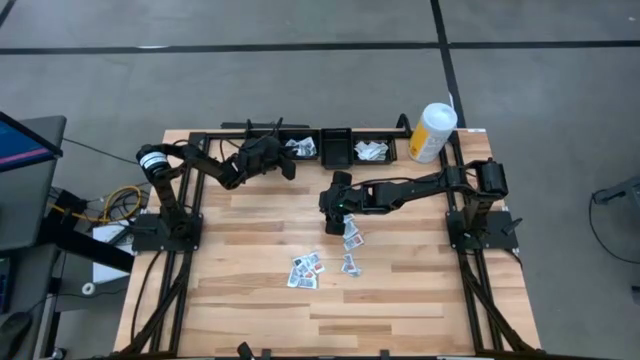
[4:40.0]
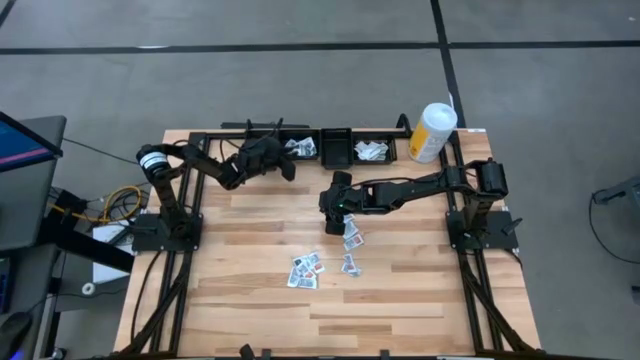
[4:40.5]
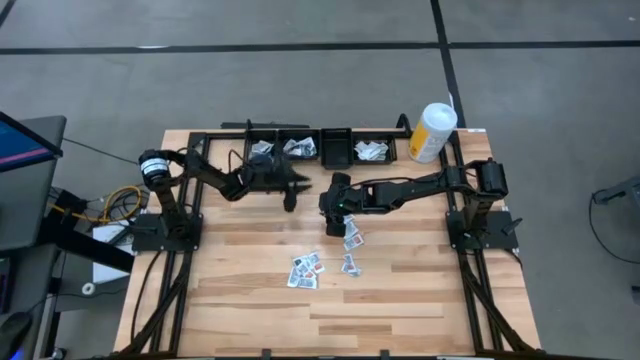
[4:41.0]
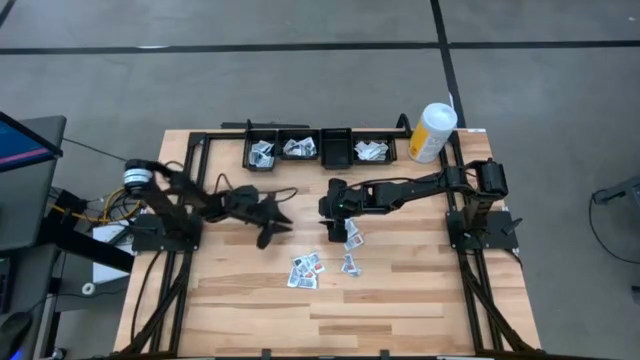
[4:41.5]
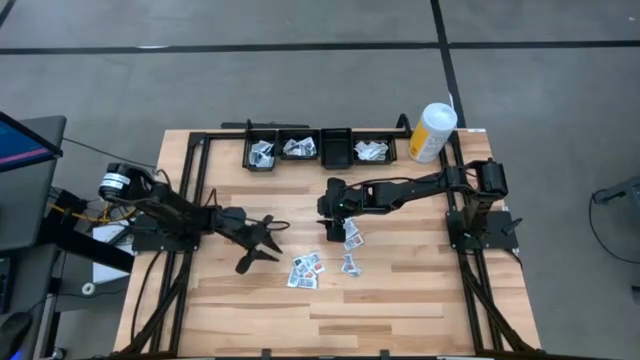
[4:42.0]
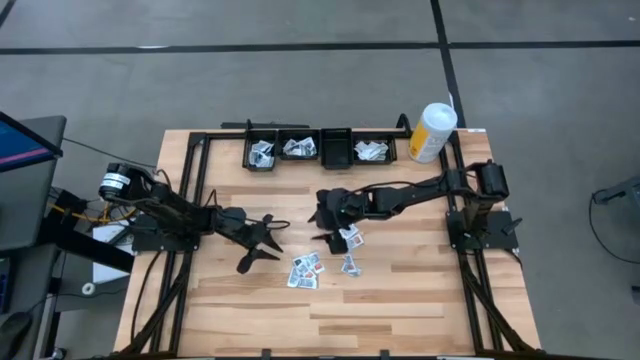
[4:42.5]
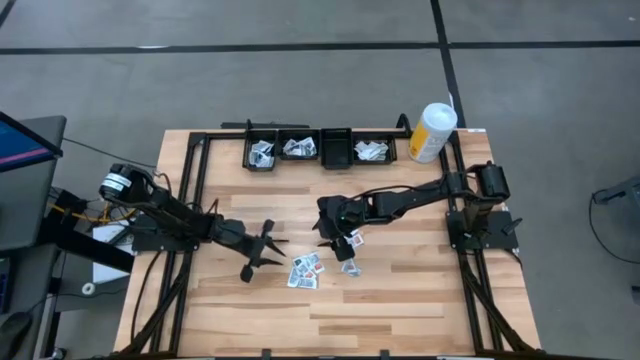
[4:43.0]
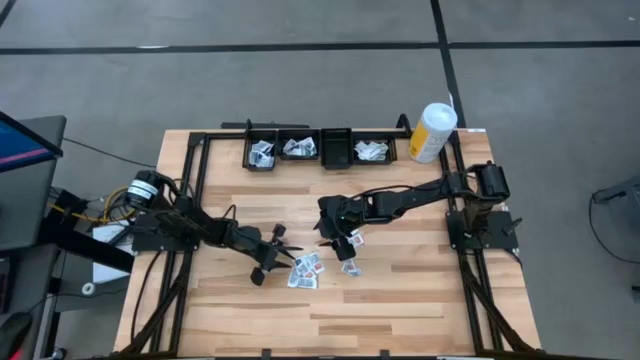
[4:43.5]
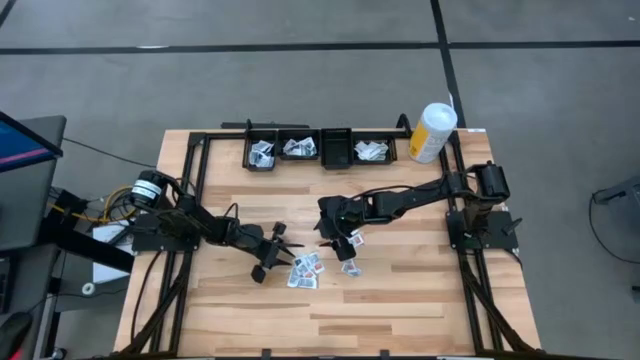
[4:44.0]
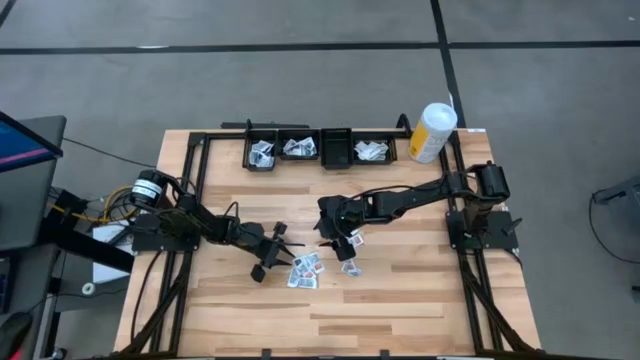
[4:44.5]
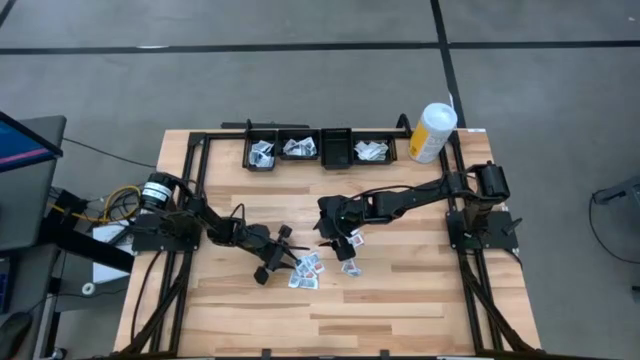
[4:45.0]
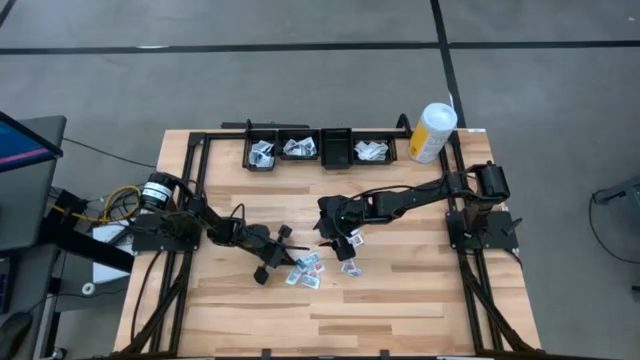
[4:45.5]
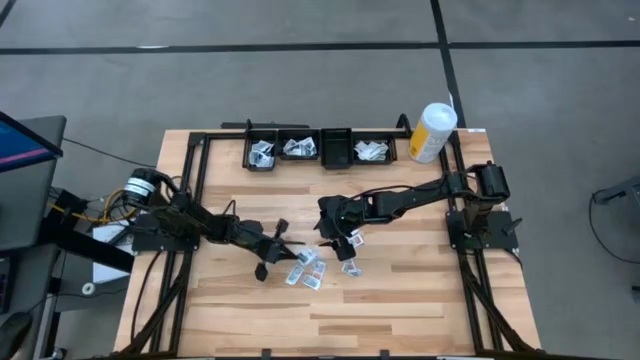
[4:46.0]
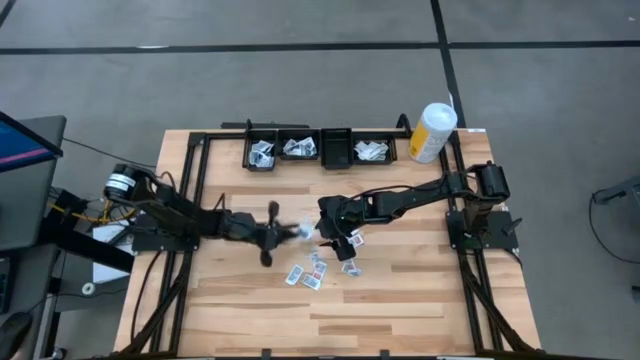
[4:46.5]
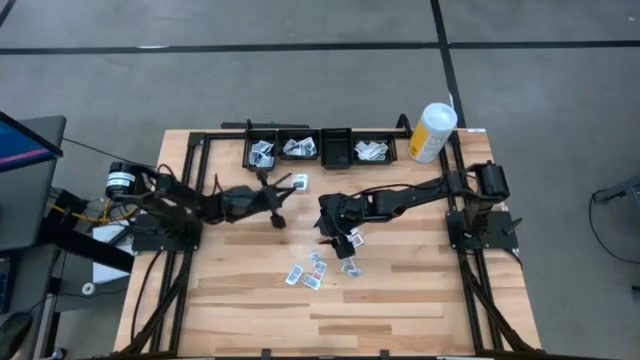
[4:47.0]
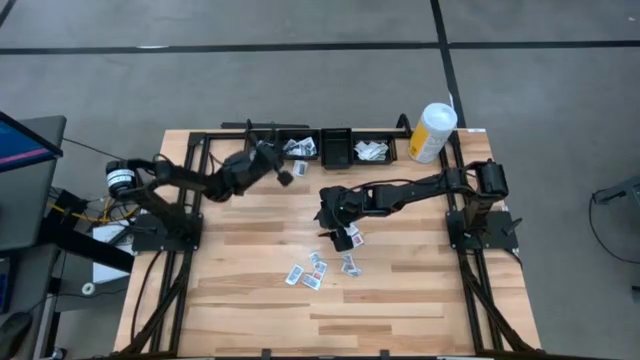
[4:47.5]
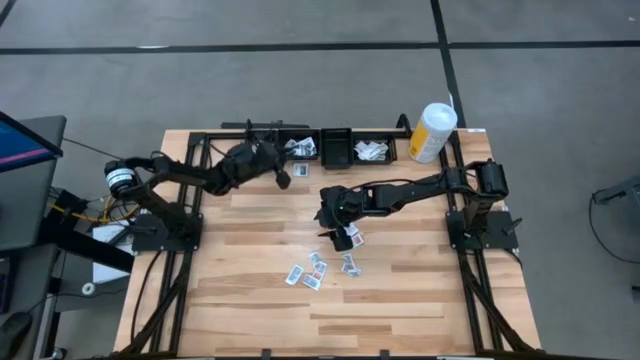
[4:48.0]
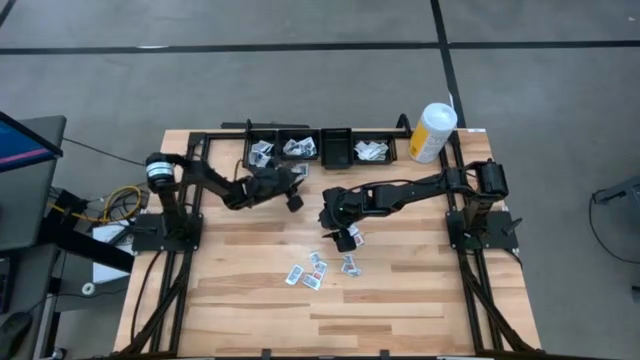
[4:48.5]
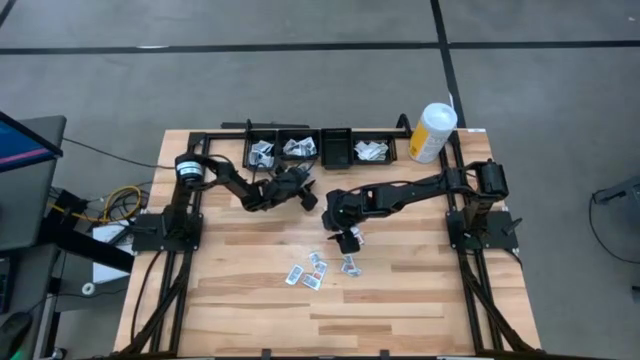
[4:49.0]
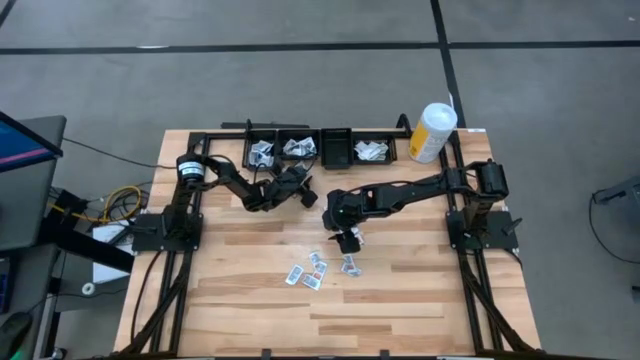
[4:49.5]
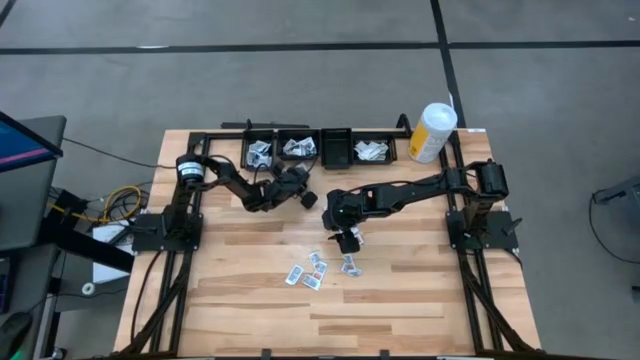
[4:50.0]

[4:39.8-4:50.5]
Task: Pick & Place First Aid Supplies
Put the black towelette pack into the middle left black bin

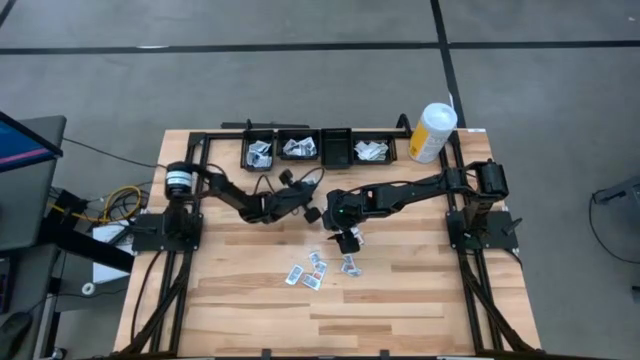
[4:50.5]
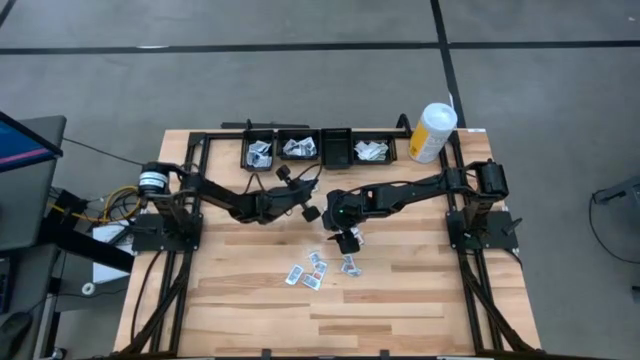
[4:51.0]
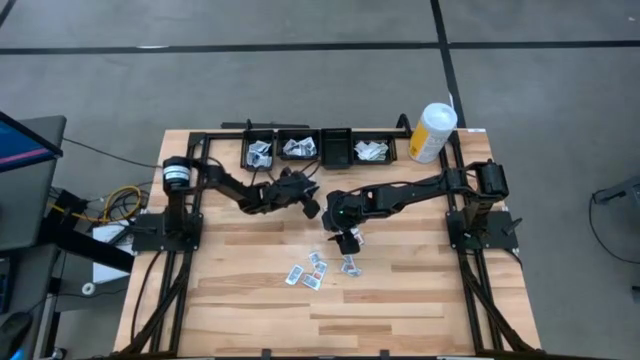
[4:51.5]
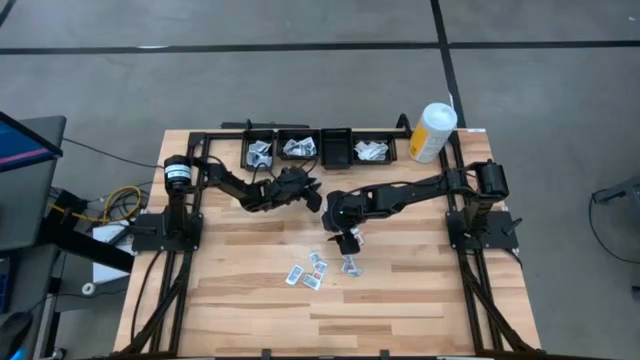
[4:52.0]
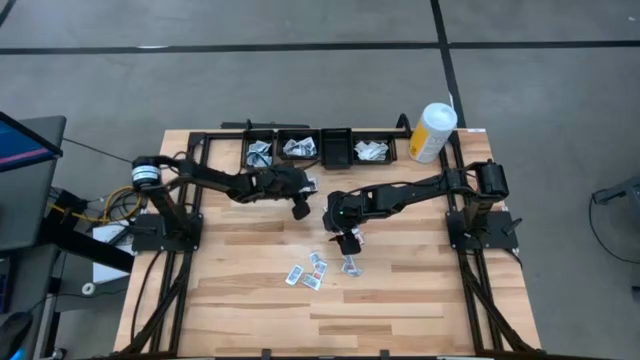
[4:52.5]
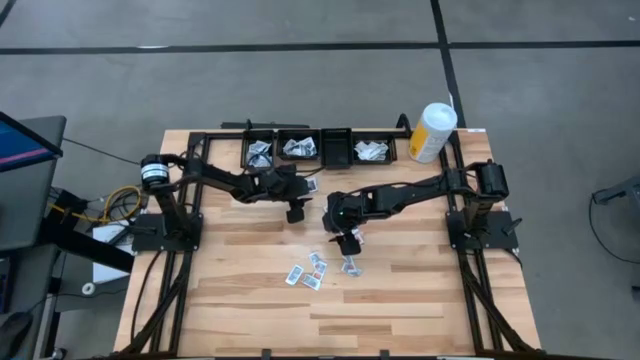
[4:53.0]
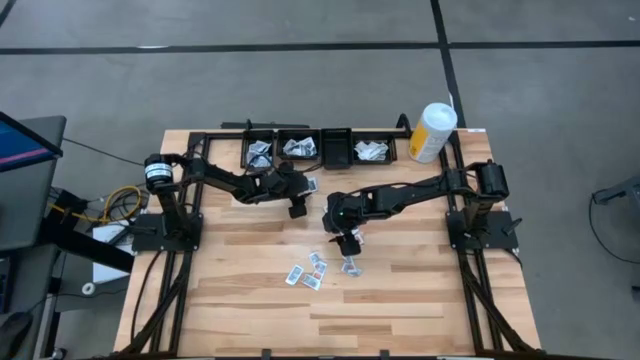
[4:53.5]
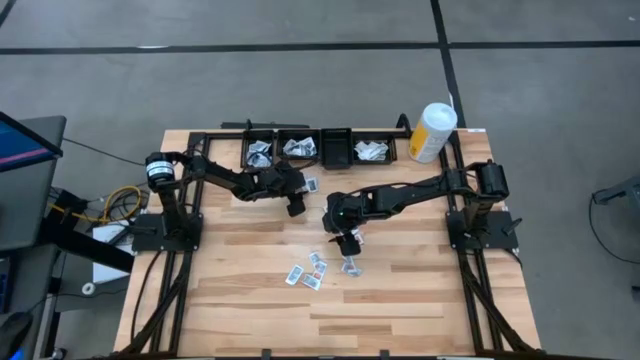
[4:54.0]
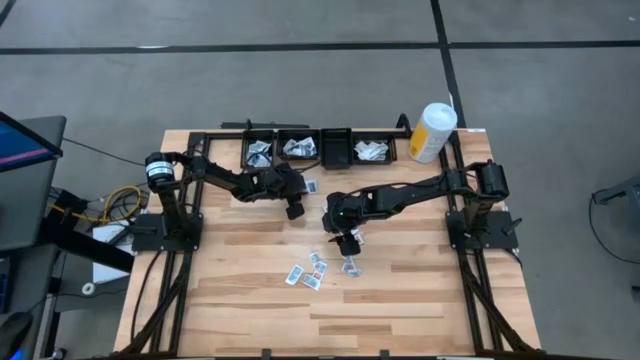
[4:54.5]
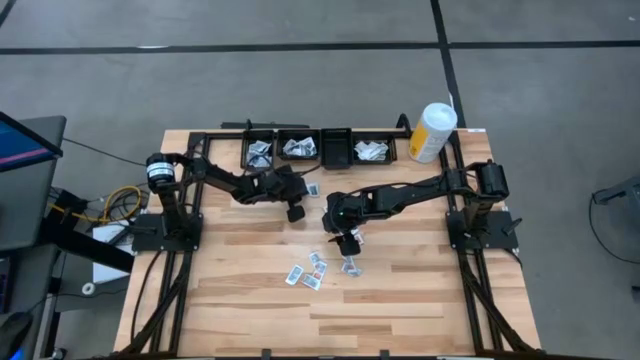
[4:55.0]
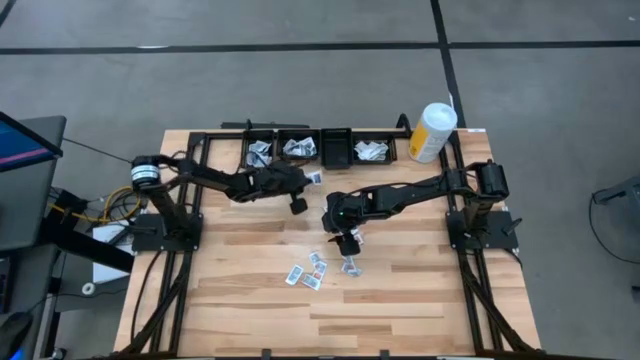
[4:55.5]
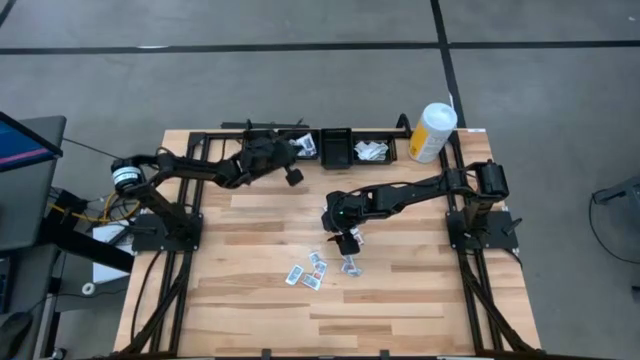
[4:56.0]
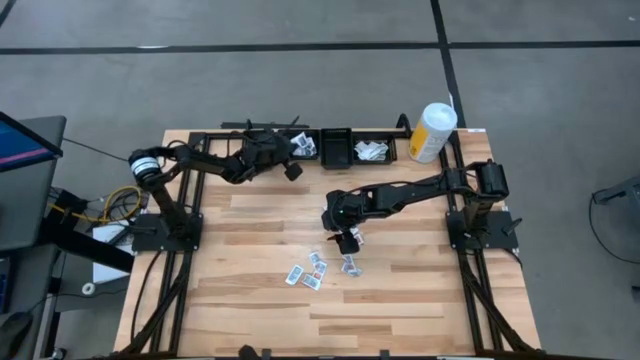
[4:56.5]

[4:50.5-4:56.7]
Put the black towelette pack into the middle left black bin

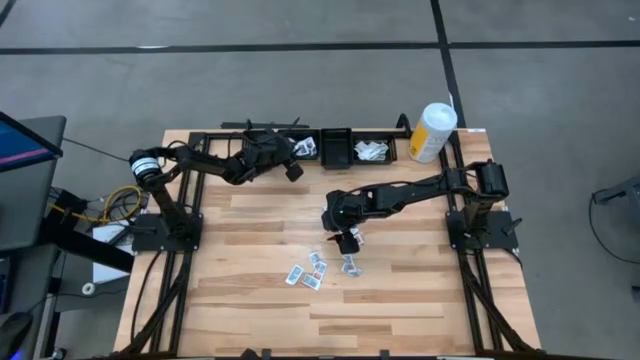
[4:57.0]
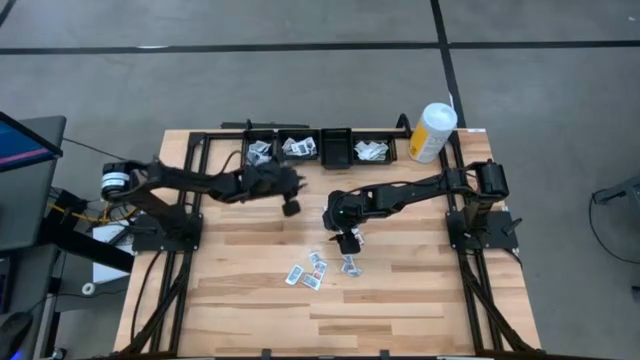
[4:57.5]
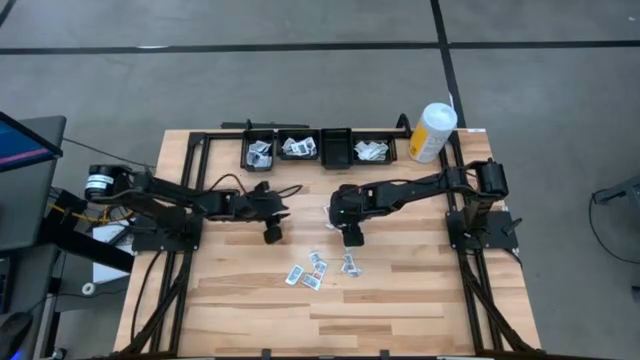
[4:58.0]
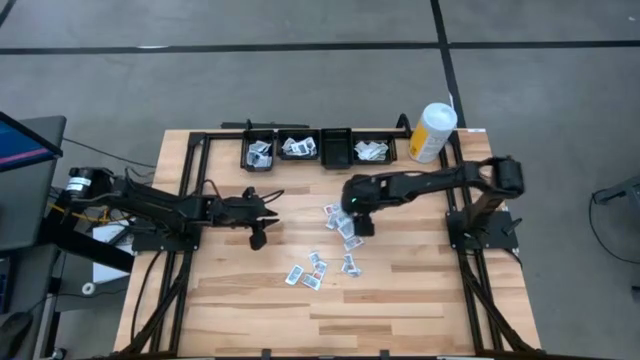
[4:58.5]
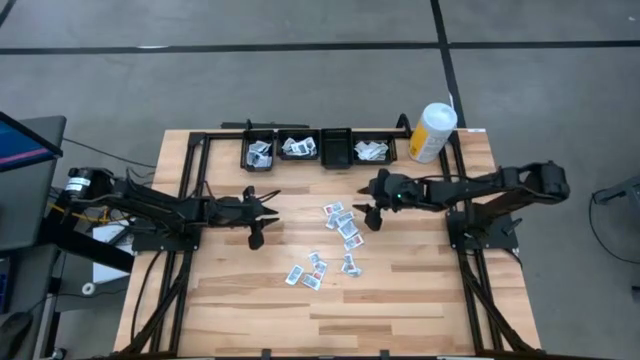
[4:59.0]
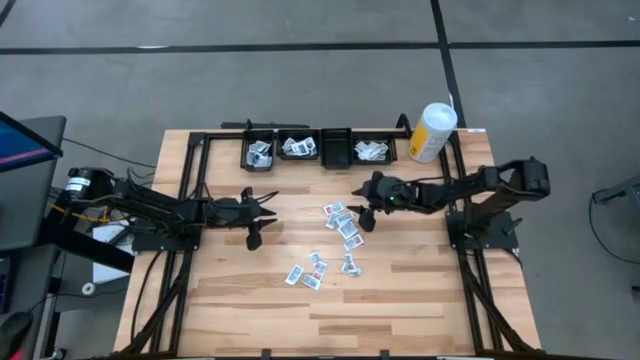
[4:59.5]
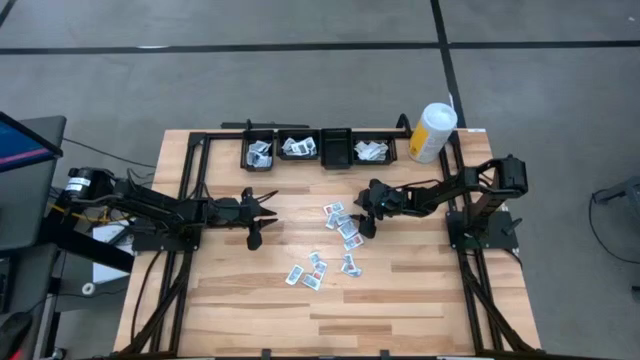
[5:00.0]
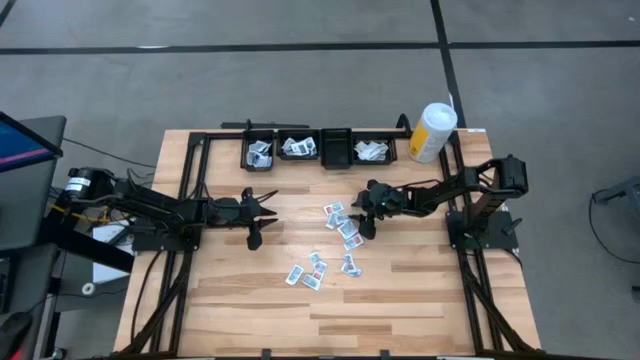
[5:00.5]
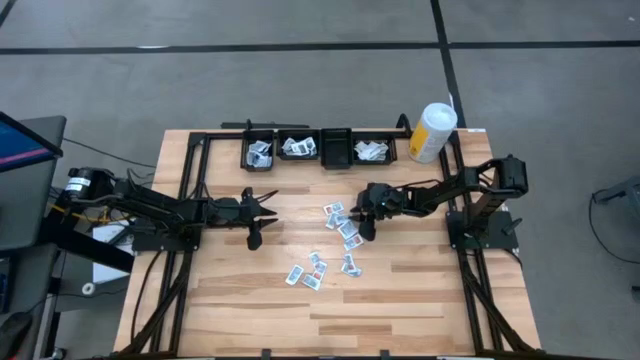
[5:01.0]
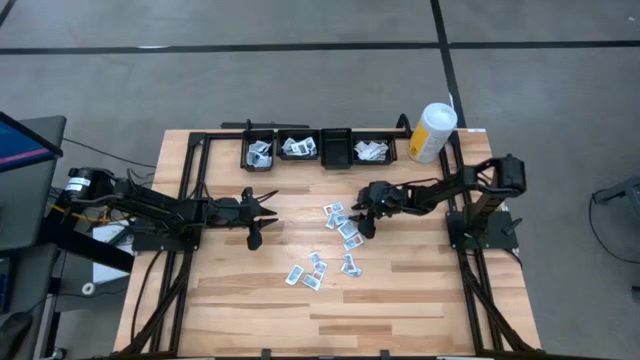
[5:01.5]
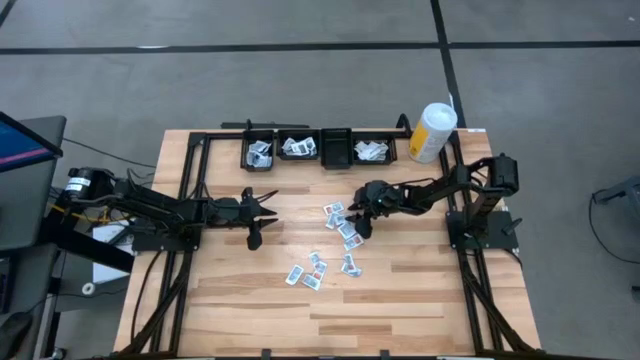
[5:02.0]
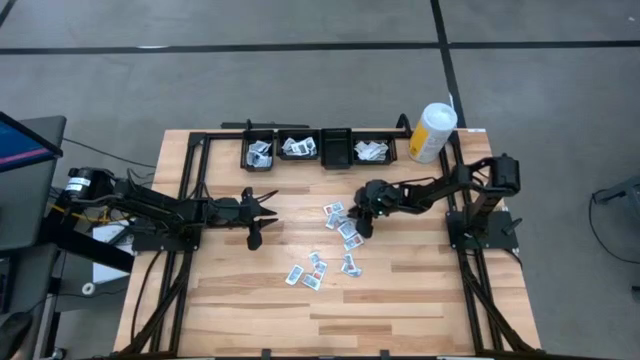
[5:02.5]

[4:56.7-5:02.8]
Put the orange ointment pack into the middle right black bin
